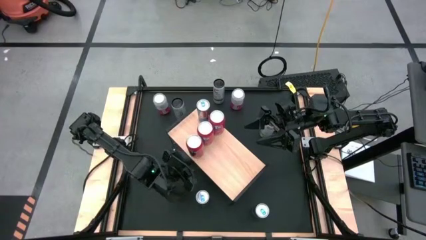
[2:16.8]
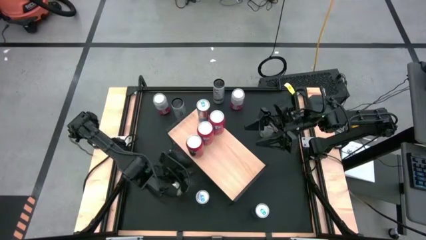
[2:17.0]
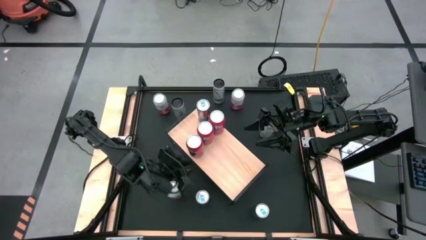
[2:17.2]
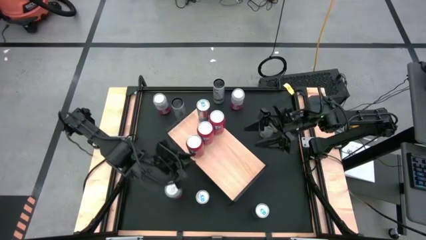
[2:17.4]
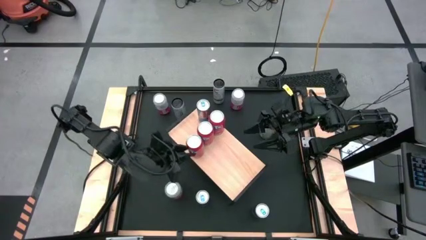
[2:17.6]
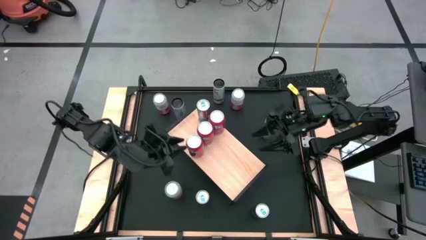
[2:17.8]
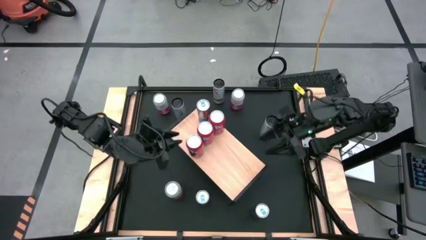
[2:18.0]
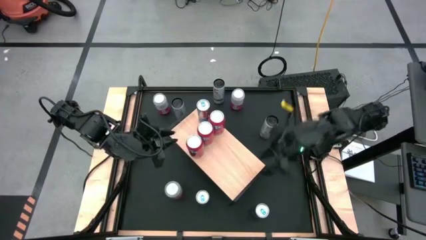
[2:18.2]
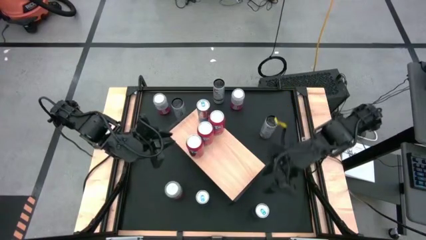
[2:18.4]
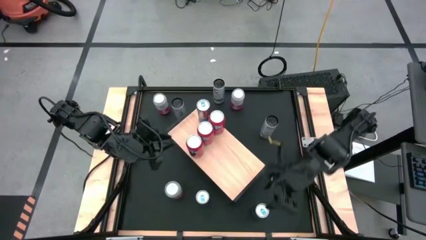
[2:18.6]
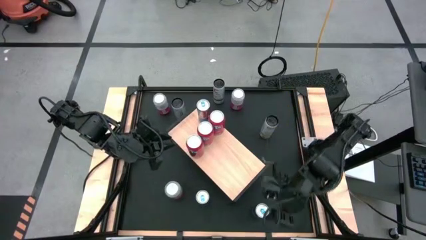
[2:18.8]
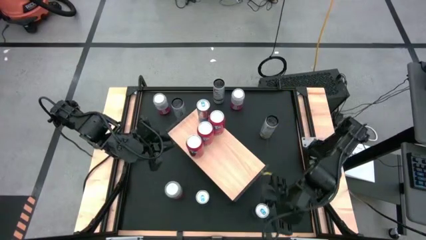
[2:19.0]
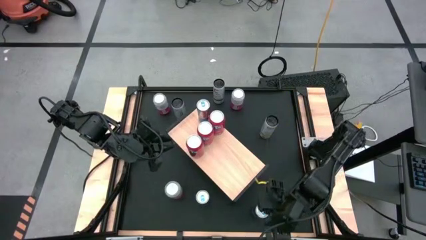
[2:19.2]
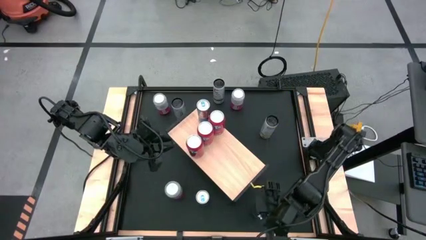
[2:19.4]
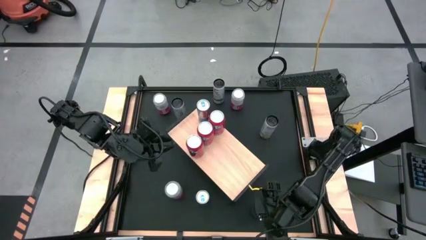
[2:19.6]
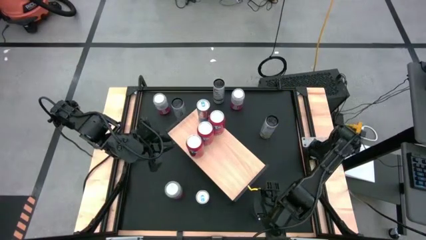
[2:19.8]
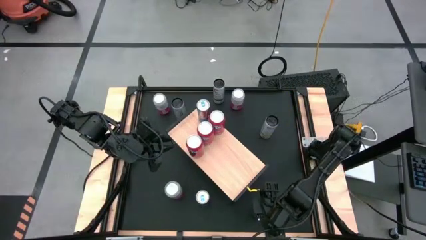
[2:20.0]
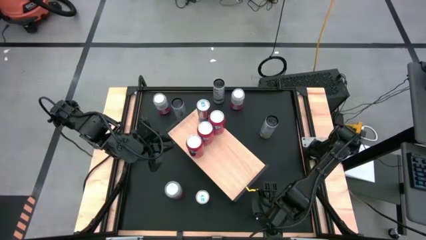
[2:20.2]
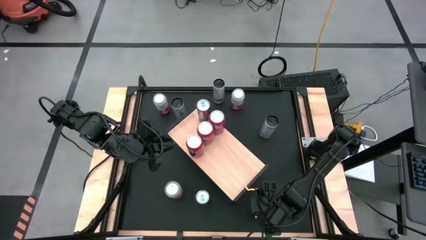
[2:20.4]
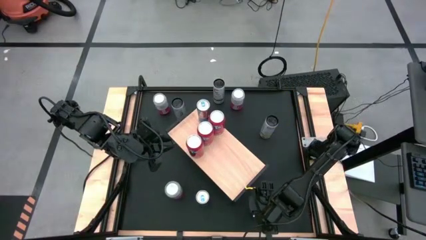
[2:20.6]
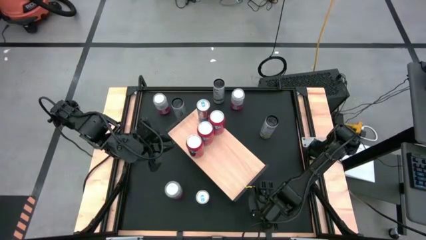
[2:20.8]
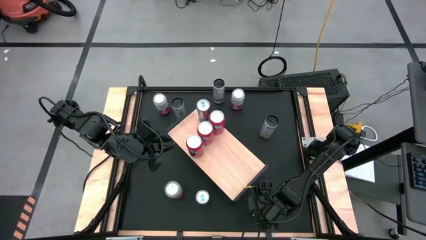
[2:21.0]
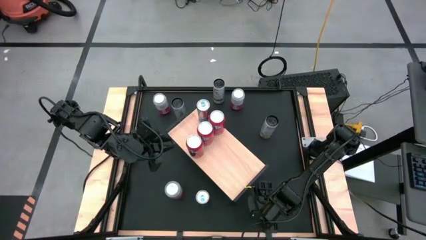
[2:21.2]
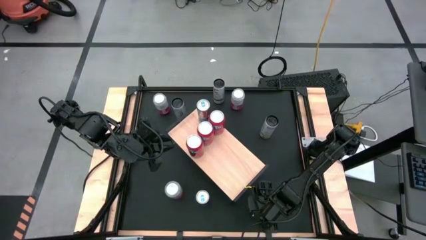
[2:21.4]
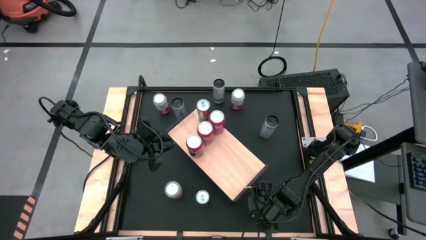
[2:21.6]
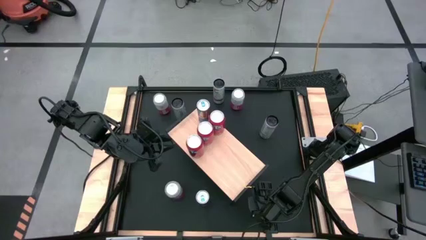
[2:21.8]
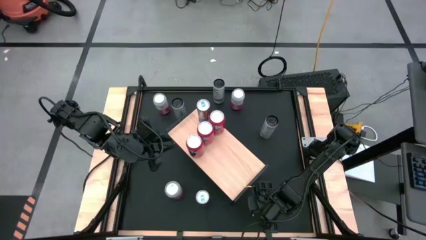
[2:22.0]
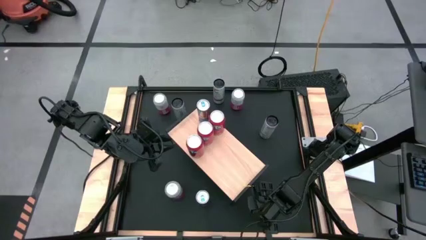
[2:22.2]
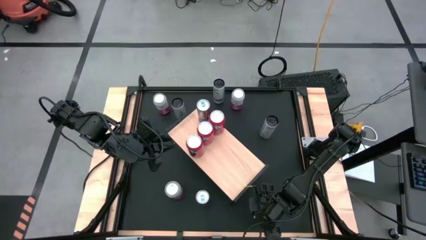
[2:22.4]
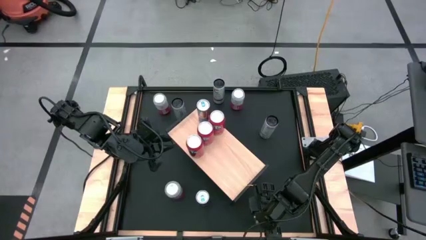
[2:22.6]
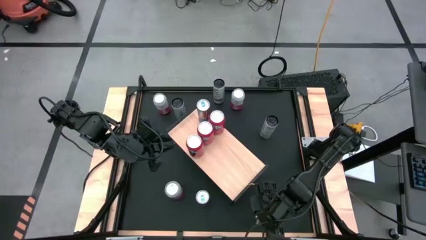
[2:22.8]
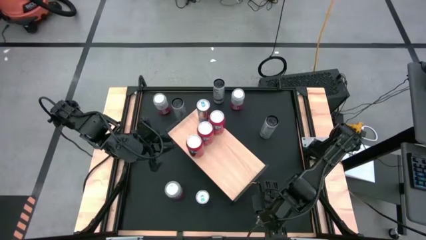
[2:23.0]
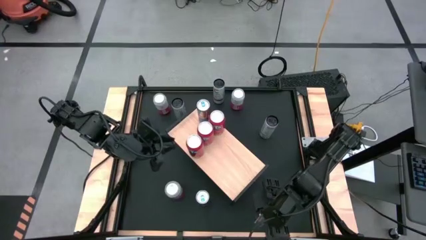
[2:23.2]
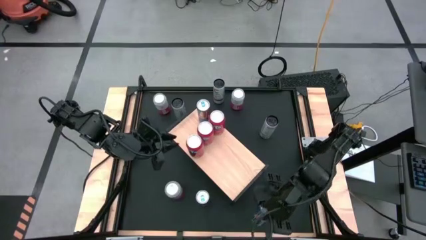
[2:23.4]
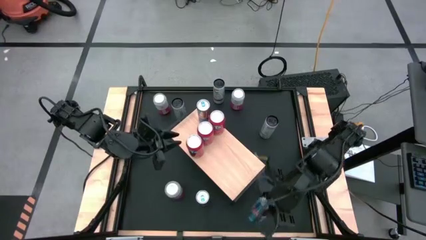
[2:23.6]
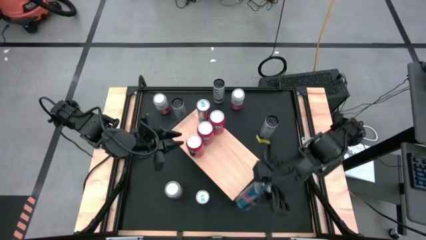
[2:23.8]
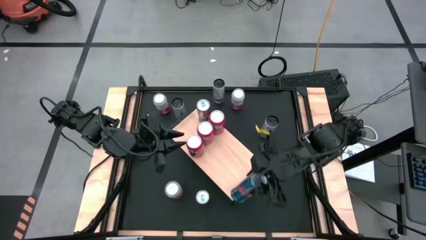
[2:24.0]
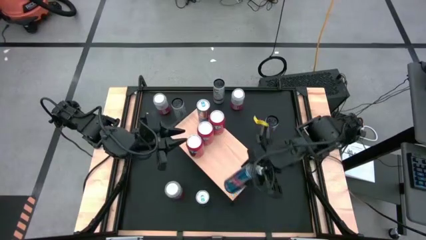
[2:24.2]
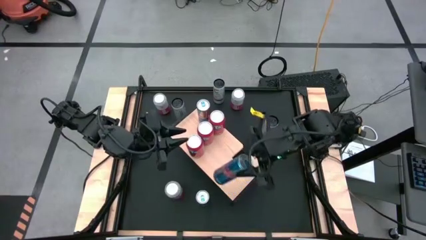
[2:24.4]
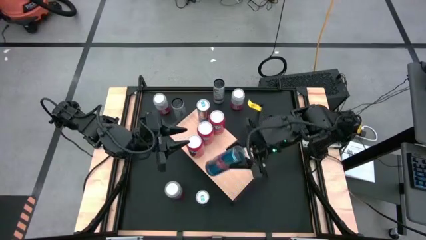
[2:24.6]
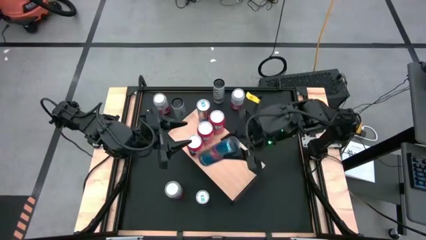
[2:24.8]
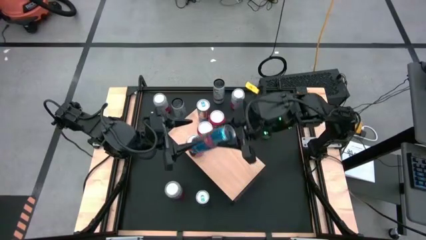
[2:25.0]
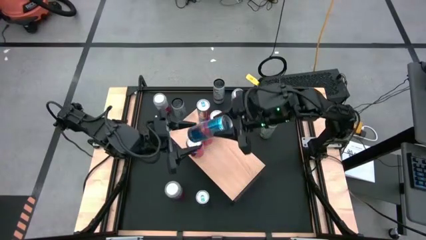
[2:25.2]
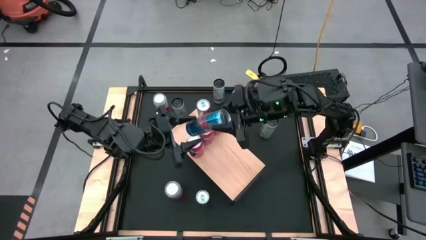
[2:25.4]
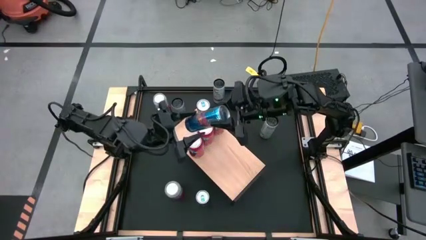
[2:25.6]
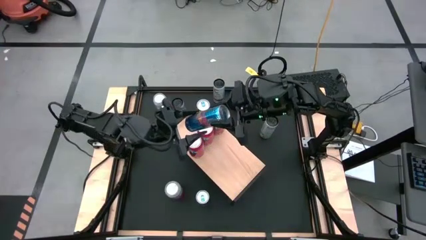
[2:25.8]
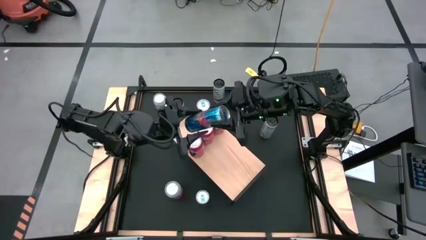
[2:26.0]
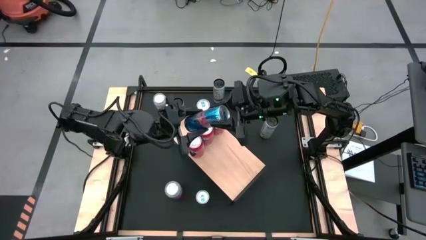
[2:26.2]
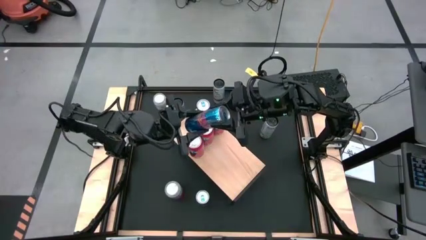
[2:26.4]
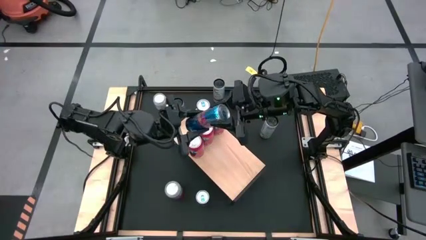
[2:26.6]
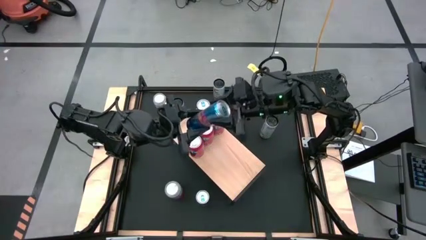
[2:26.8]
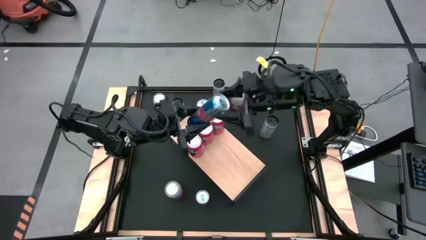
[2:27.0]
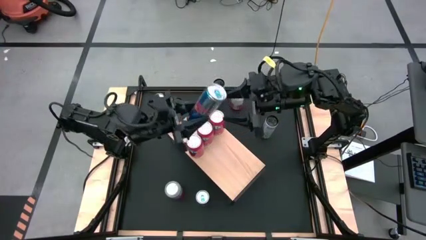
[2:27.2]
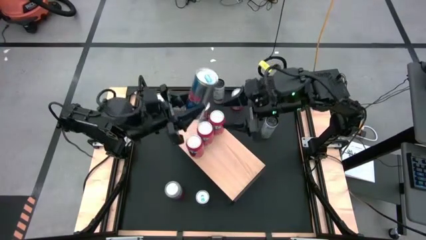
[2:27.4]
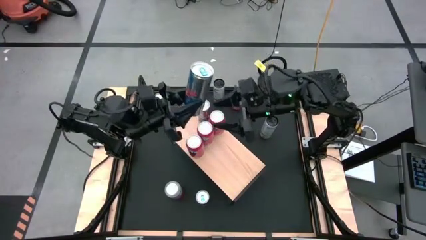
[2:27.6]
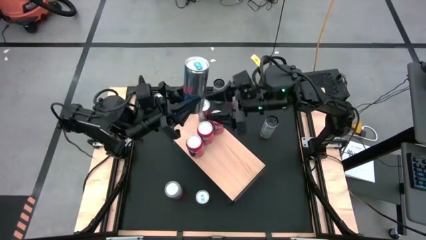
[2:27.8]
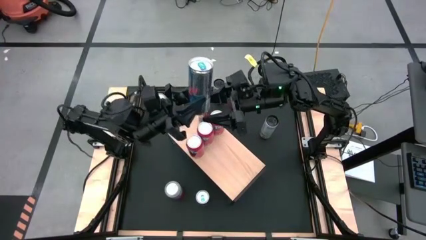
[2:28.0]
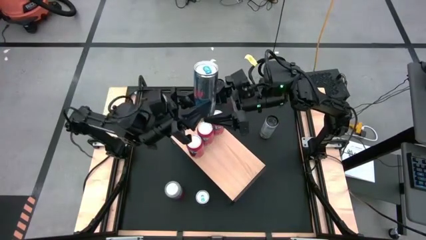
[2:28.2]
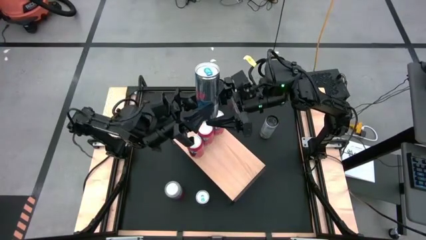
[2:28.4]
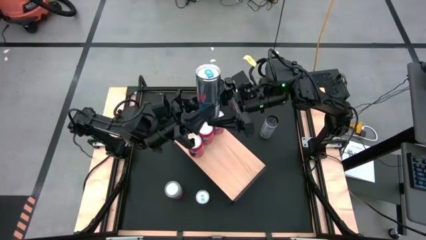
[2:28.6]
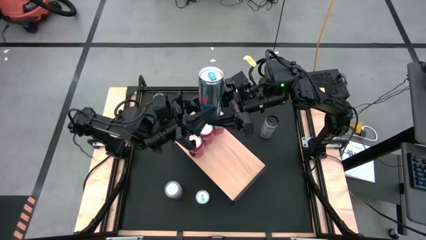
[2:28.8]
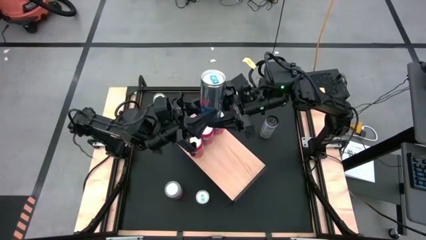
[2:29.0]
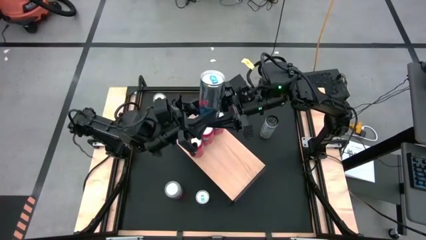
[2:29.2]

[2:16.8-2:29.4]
Task: Place canned beverage on shelf
Put the bottom blue soda can on the shelf aligned with the other blue soda can

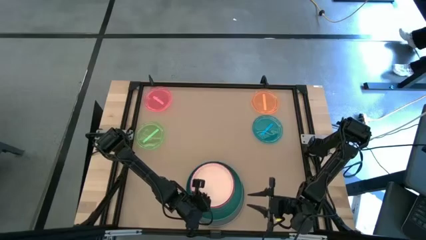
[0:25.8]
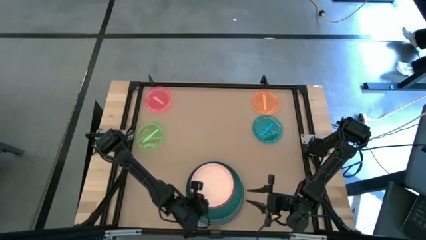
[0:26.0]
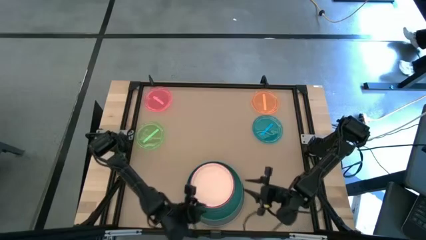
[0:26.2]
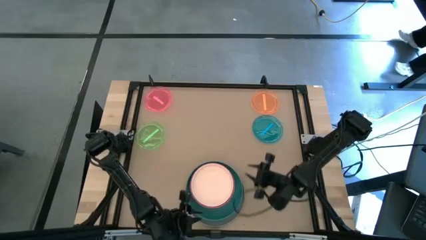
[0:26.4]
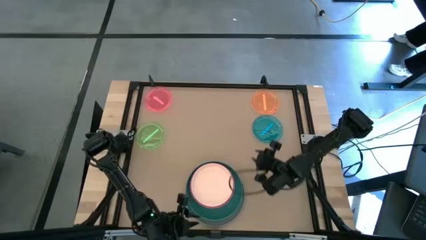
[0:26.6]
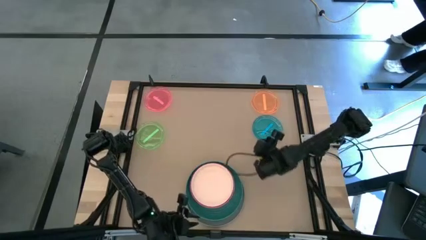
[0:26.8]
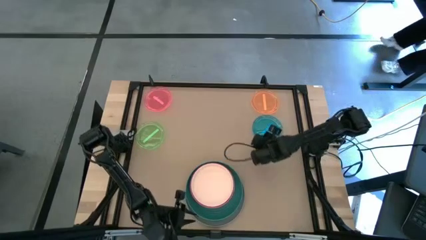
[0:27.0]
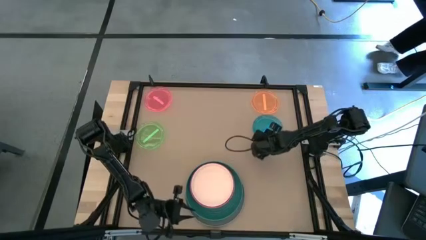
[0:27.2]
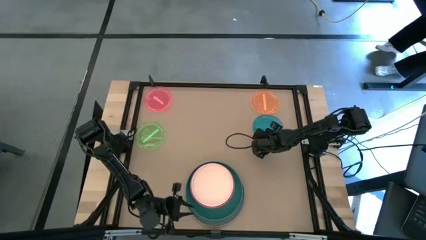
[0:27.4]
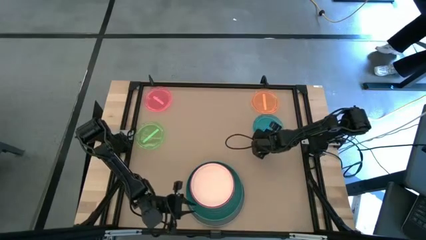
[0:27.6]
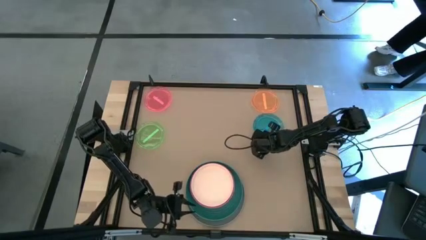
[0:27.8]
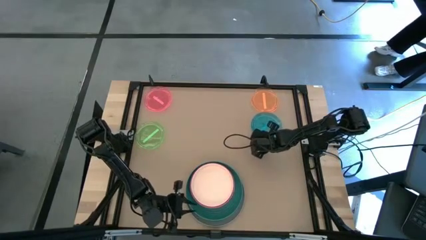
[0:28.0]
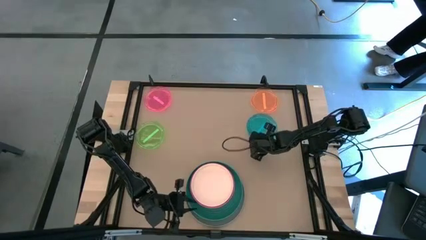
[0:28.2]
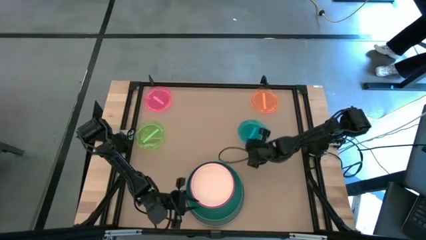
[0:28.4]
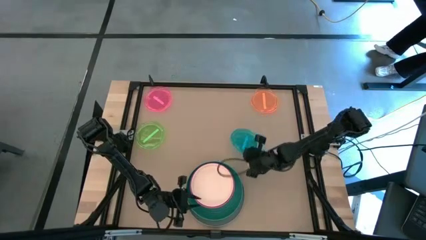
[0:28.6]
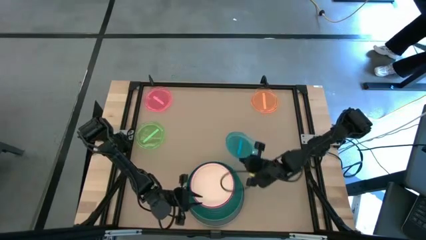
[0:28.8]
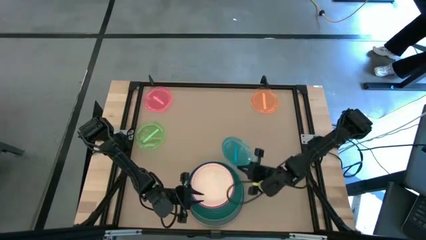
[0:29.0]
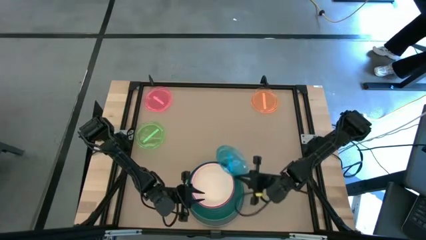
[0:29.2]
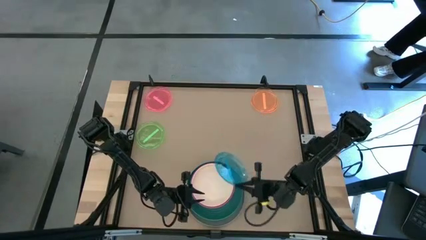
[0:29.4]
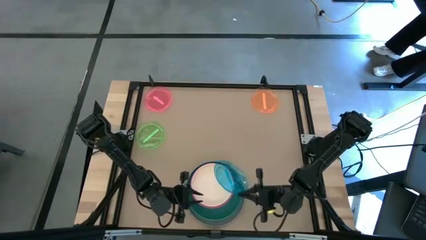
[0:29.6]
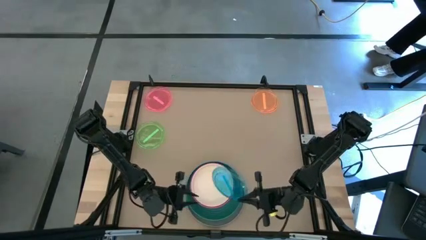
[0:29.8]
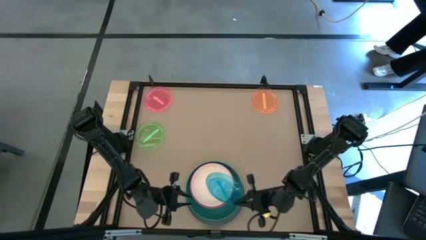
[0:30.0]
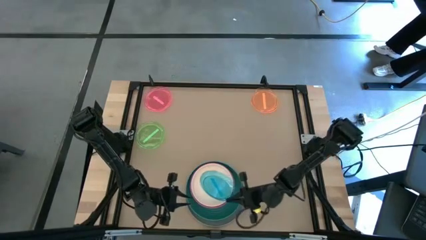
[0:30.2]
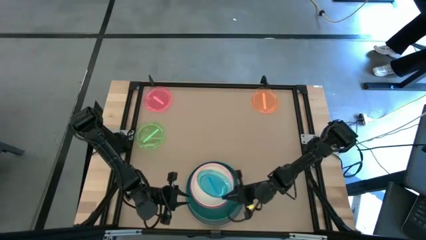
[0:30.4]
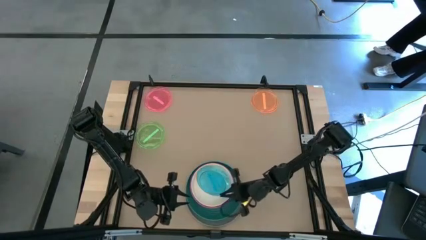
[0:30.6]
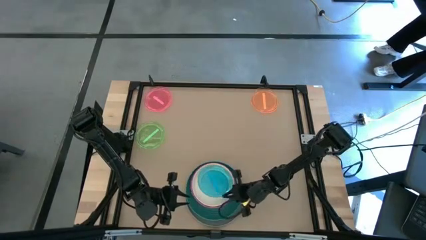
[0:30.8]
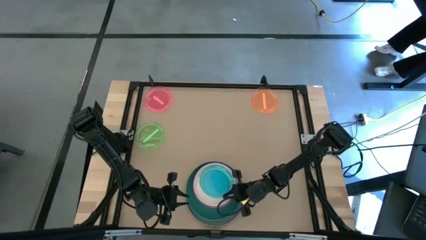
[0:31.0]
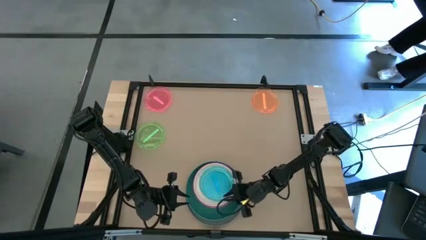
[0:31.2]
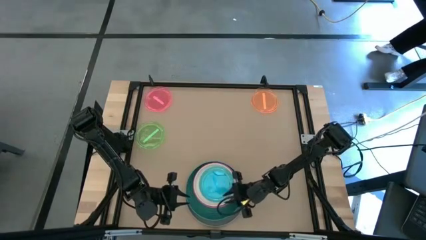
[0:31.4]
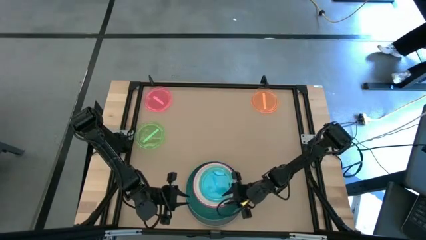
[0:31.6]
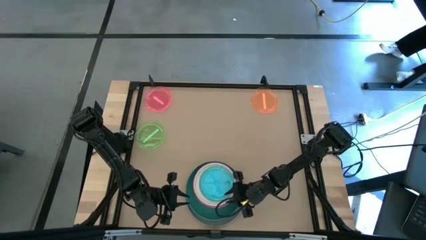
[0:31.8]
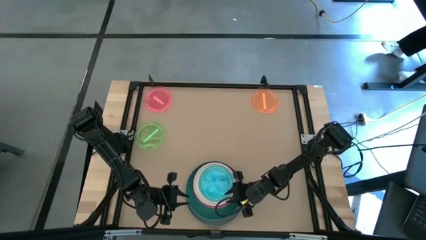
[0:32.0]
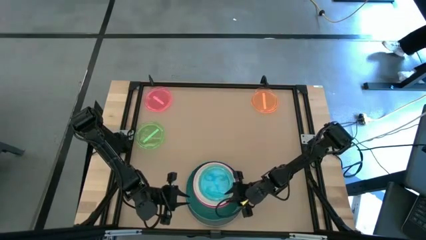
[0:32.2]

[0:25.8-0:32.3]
Task: Stack plastic plates
Stack the transparent blue plate on top of the white plate
